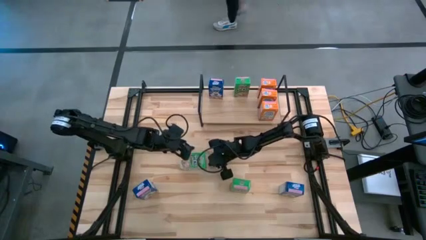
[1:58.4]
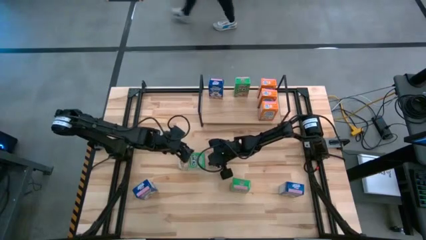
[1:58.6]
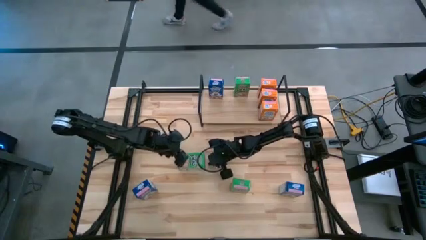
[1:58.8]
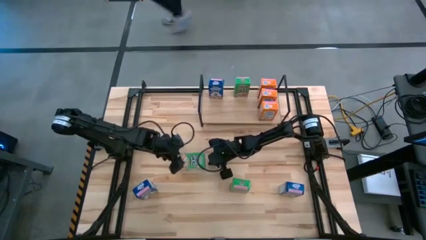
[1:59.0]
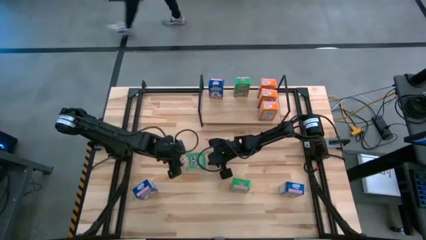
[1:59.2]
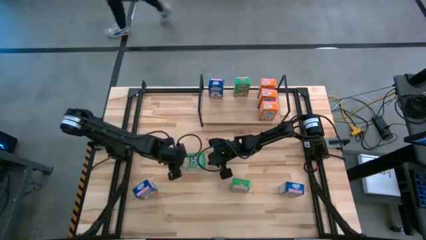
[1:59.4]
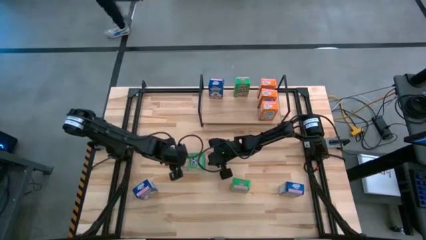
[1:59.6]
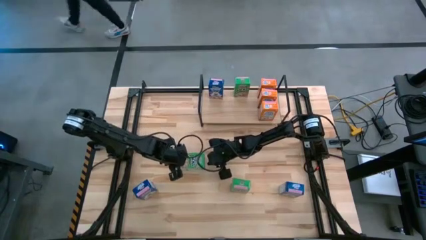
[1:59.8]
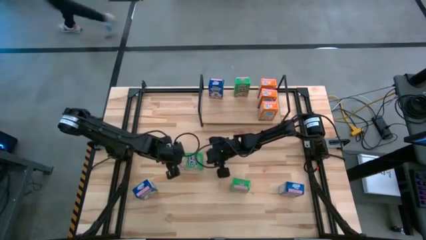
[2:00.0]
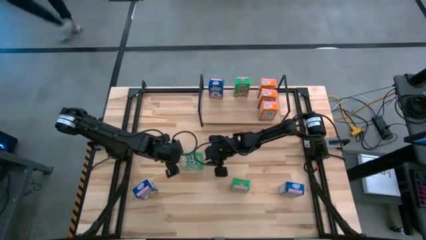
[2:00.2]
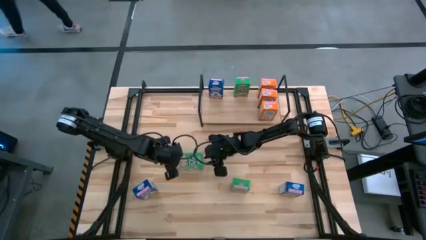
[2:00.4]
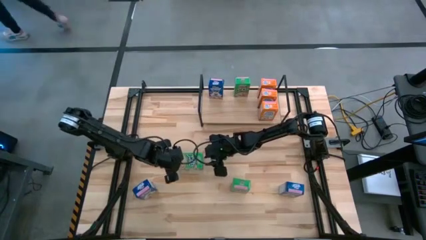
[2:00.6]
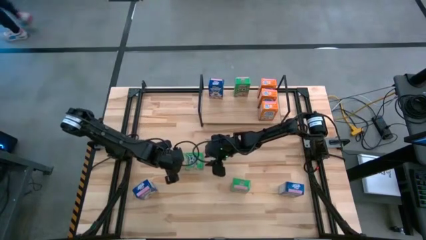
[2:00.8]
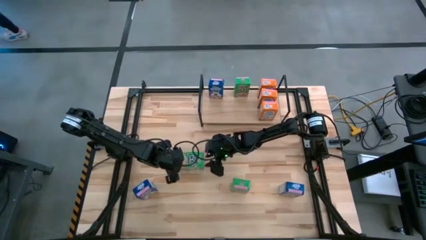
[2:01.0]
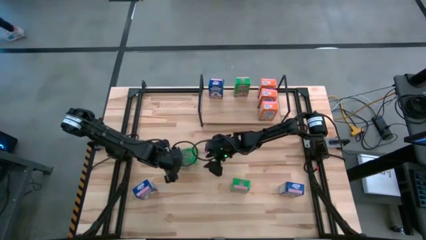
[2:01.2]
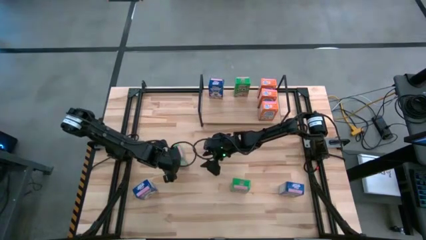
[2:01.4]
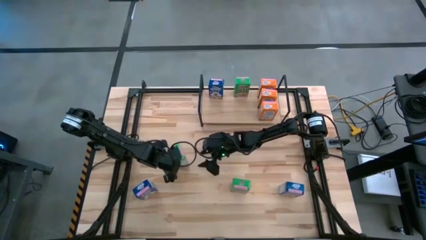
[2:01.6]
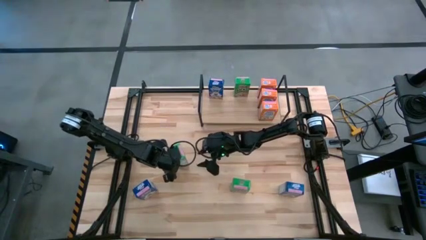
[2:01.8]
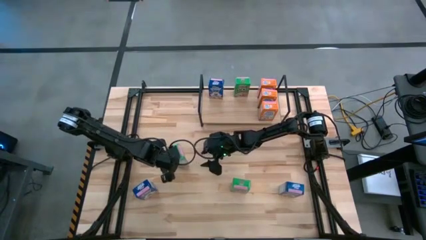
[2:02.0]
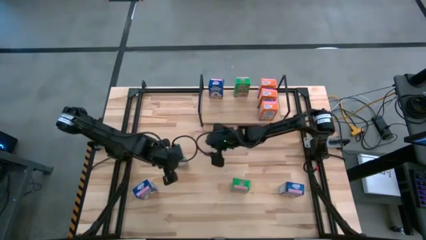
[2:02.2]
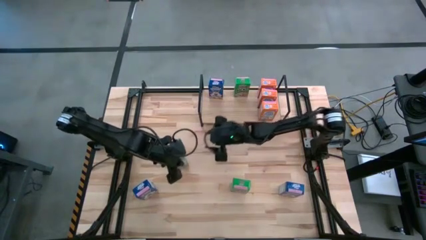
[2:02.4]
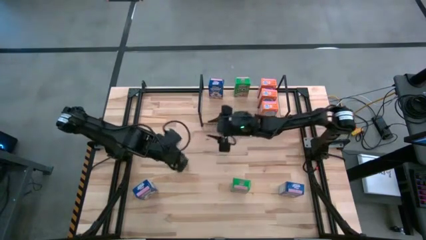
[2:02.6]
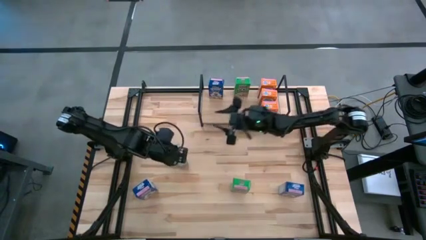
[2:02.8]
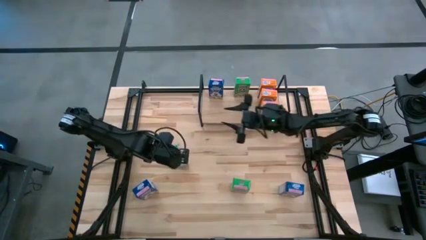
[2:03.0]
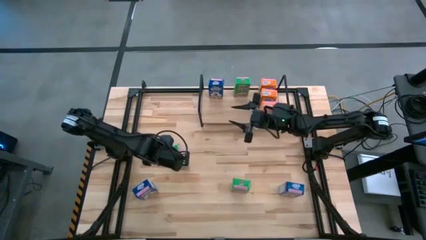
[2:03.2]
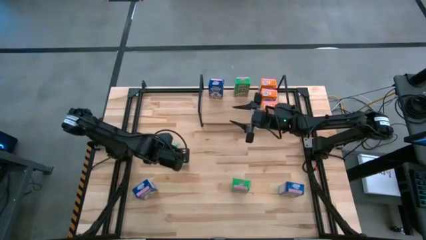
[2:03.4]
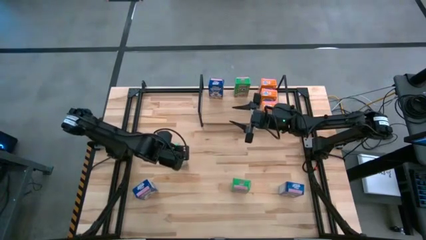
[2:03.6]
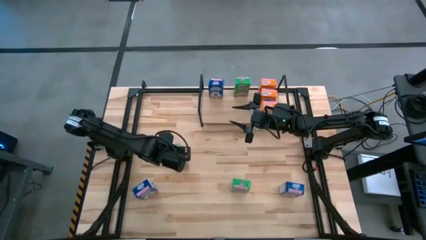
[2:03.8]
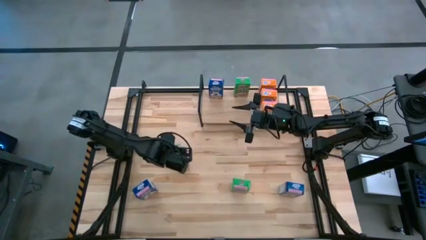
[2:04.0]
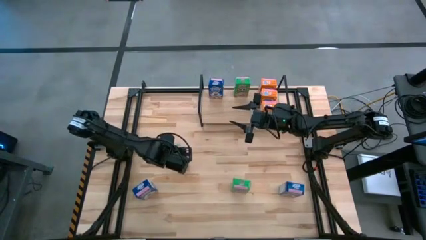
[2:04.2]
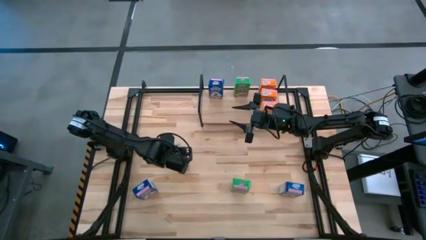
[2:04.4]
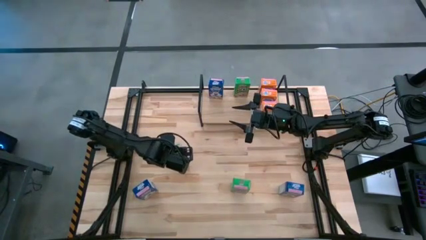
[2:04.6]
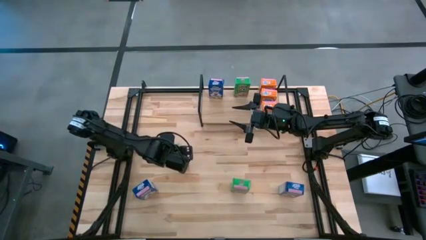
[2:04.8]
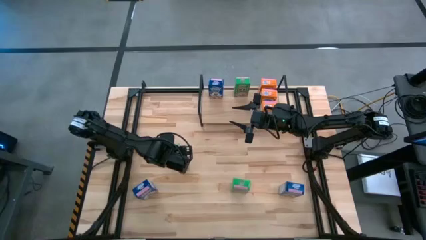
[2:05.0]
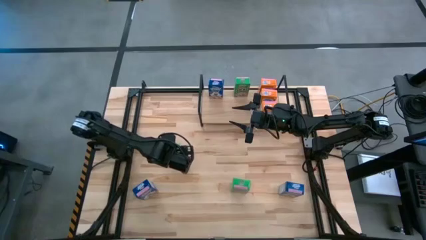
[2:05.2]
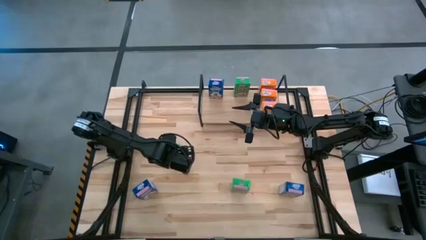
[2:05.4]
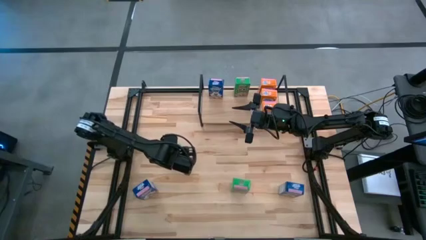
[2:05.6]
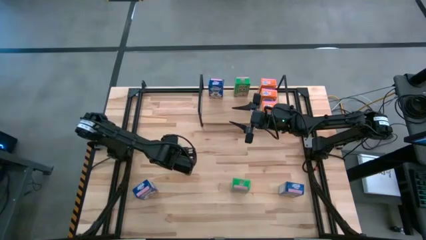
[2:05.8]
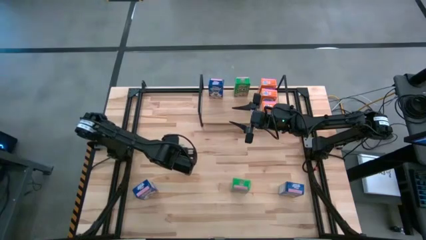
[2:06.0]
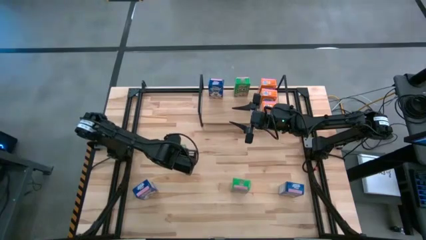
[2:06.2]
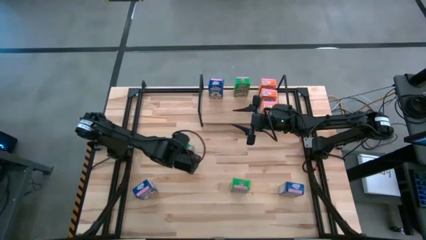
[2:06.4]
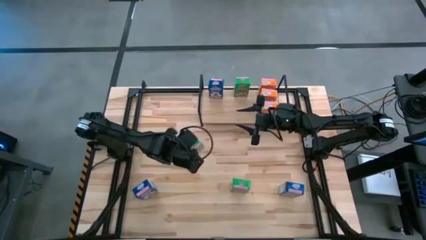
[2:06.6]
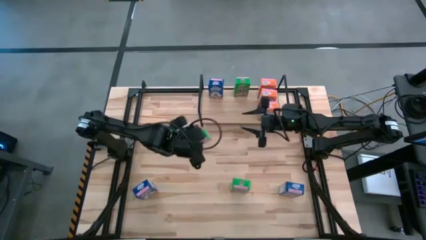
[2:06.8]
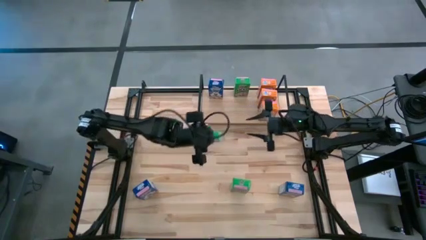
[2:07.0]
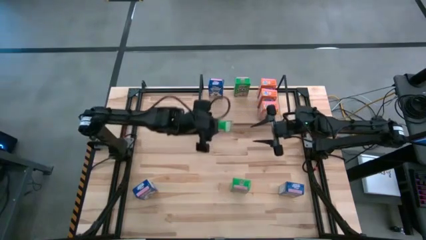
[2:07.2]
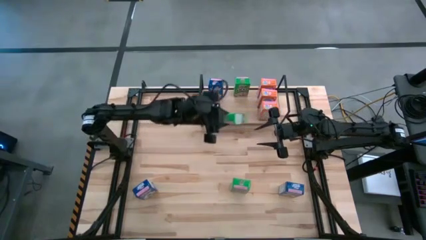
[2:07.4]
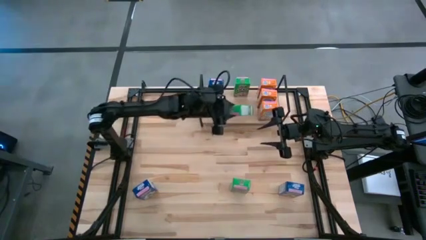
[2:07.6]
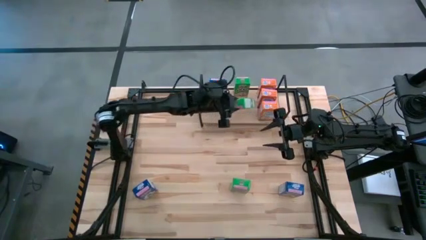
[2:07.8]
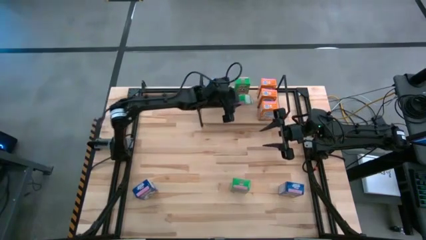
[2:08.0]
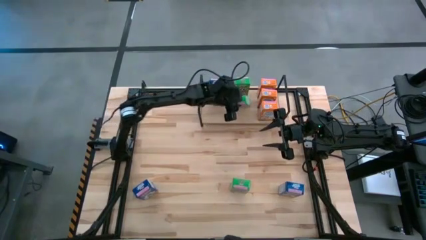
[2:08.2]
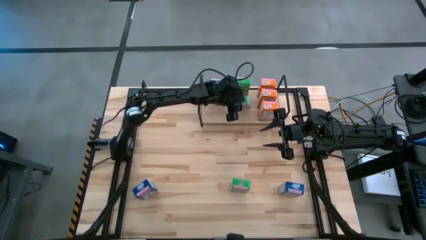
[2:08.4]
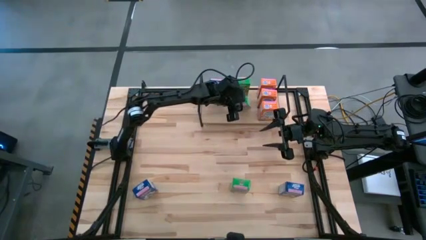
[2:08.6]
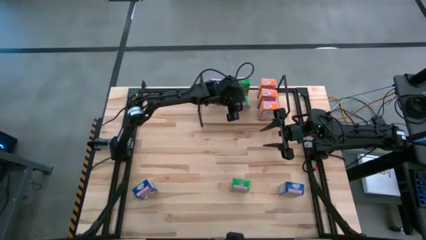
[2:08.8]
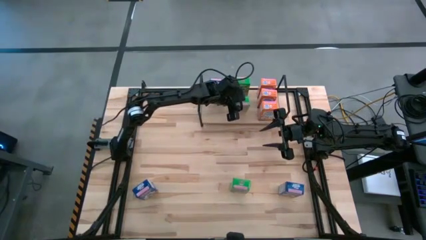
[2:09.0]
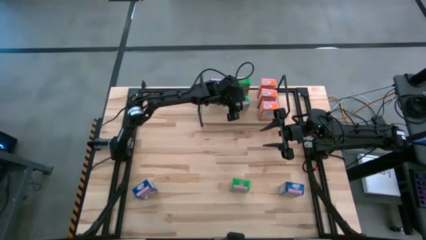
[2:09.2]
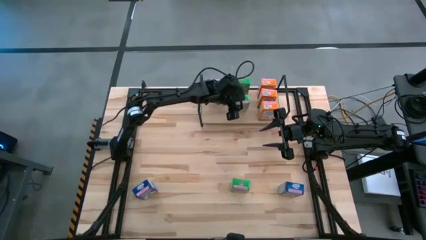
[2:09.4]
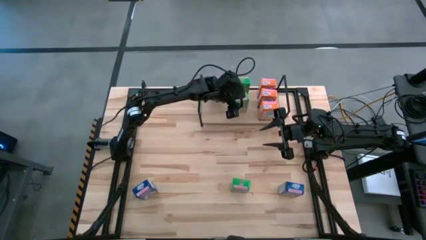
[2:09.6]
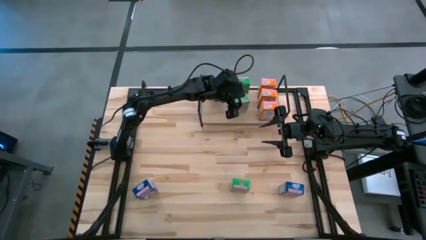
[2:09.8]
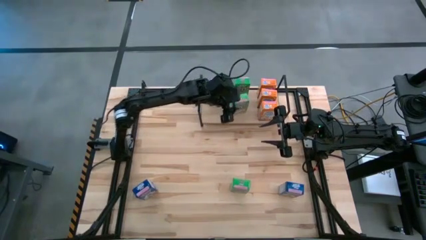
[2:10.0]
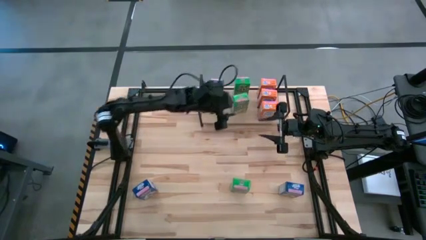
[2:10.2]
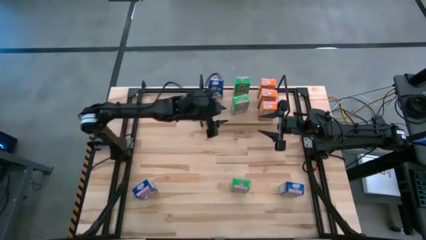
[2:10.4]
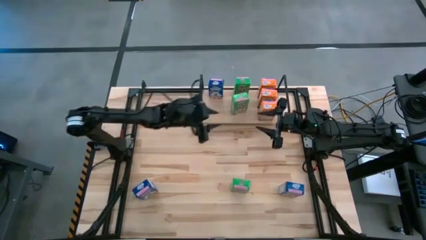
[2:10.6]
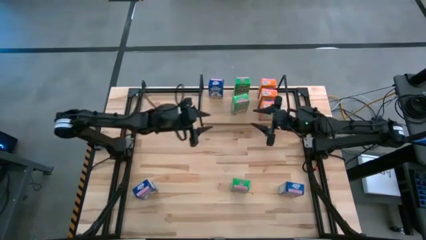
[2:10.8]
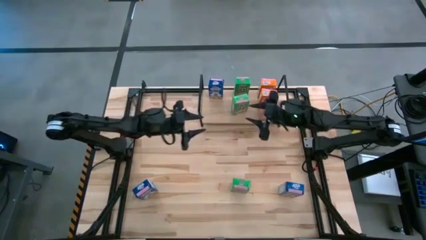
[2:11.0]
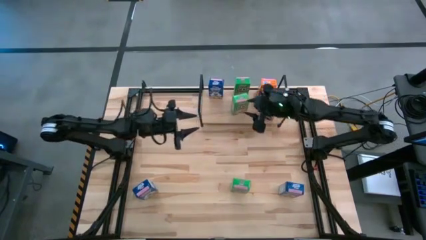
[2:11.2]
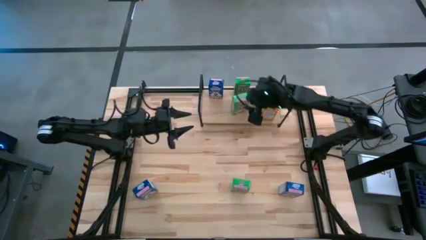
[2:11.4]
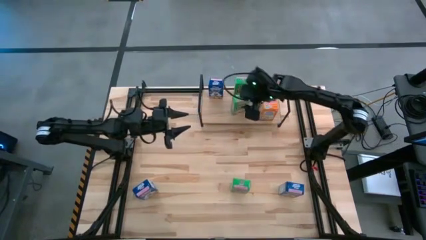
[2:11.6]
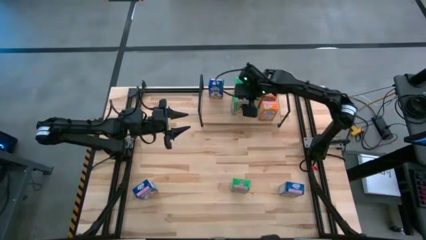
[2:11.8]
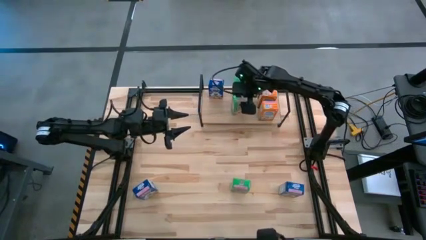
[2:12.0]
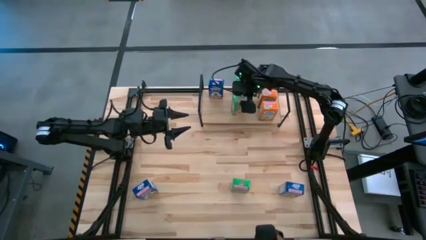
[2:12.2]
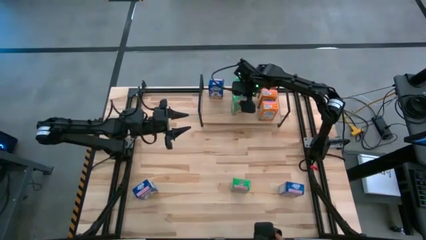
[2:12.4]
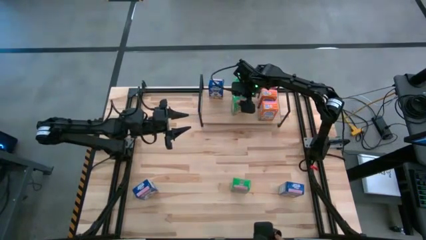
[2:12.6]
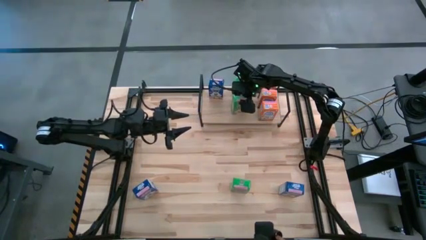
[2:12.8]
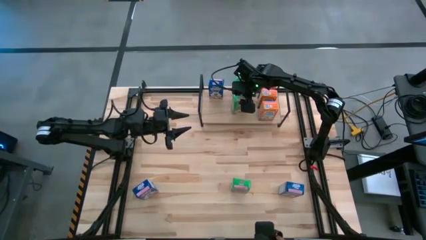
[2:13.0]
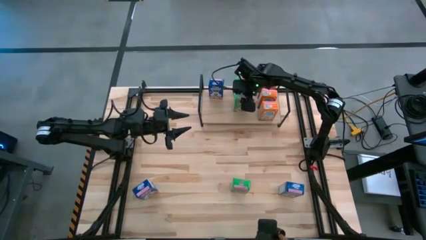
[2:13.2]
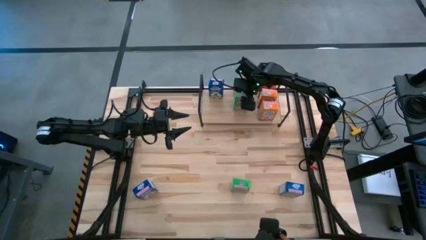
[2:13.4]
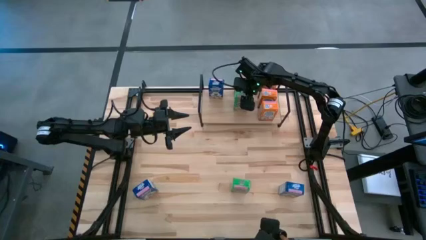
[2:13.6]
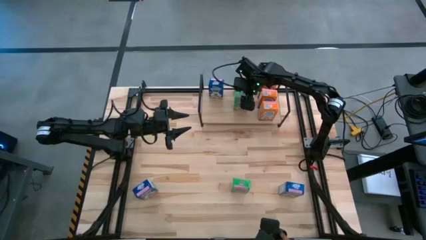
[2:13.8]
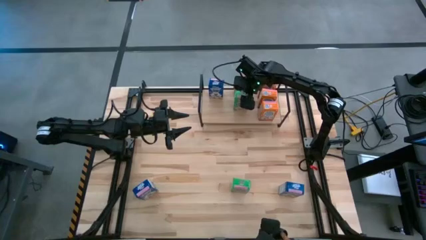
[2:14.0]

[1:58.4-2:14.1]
Task: Stack cereal on shelf
Put the left green cereal box aligned with the other green cereal box on the shelf

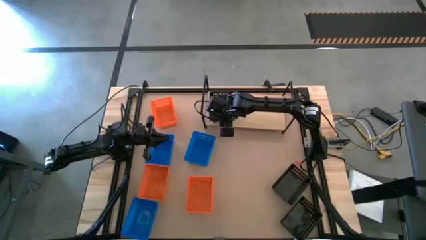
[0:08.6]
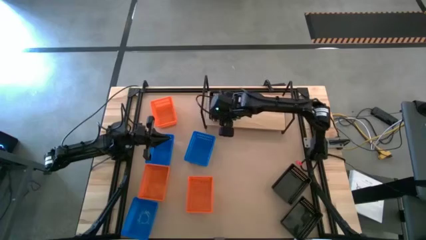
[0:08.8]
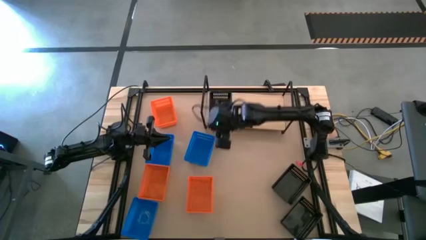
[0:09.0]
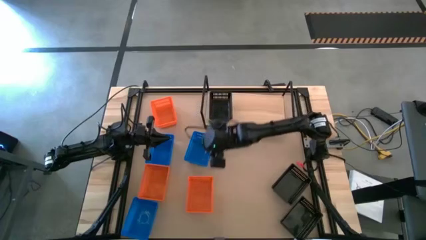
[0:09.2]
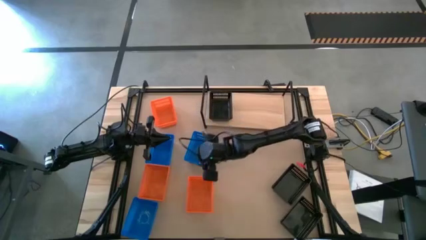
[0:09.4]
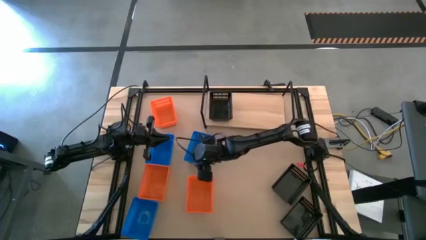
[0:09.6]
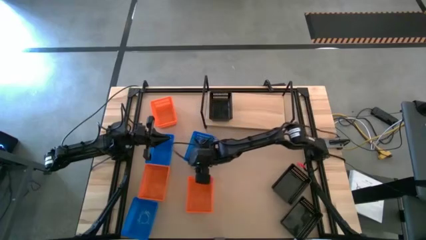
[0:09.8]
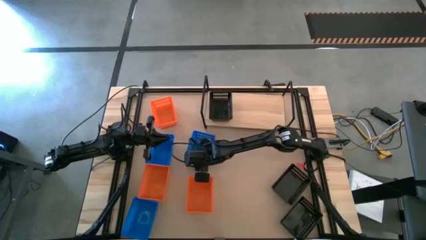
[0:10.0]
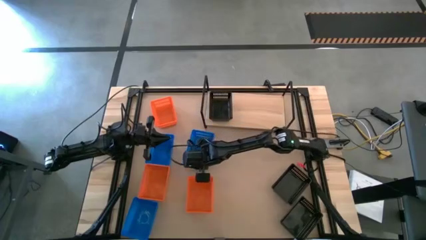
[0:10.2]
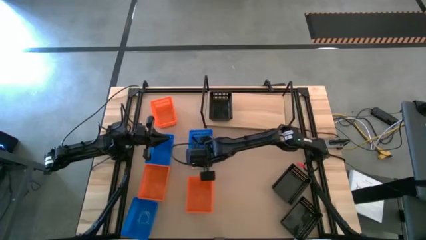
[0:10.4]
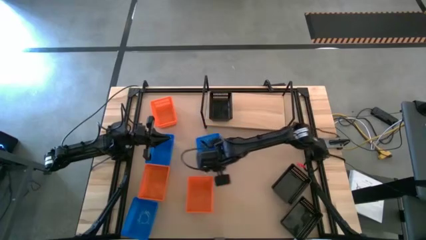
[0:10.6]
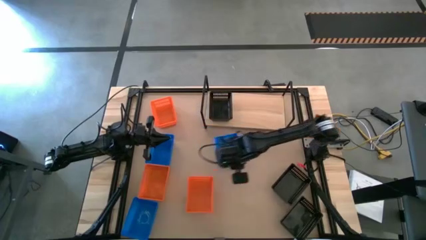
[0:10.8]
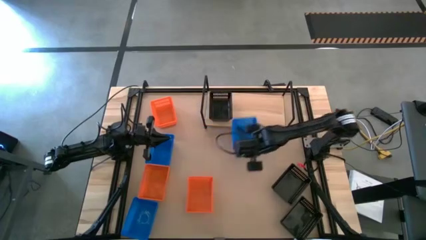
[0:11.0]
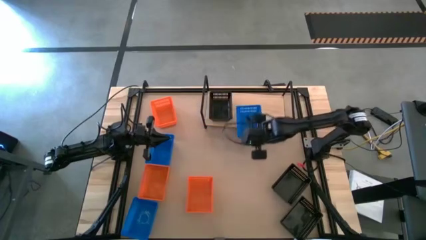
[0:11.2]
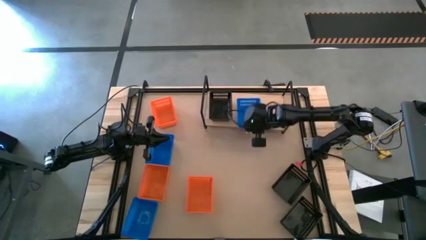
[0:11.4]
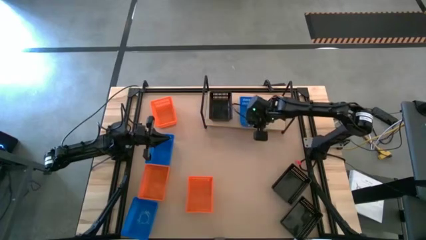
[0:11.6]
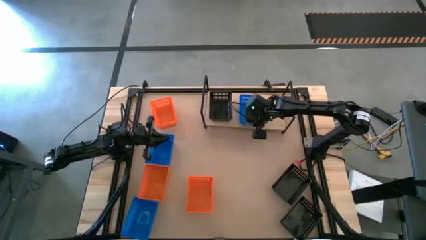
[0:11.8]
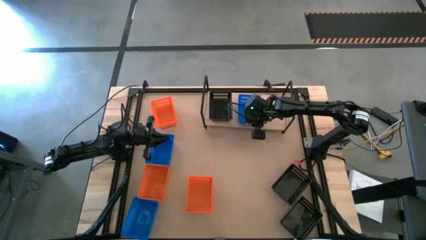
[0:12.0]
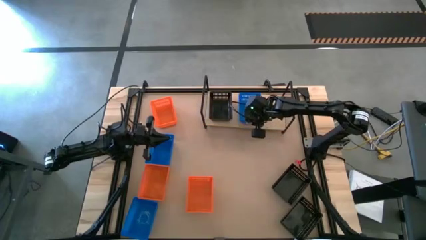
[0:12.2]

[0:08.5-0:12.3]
Task: Stack baskets on shelf by color
Put the top right blue basket on the shelf
